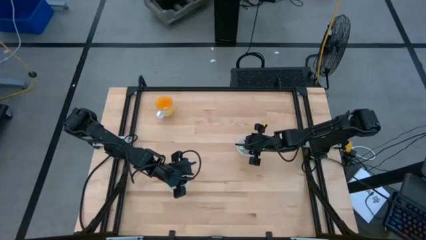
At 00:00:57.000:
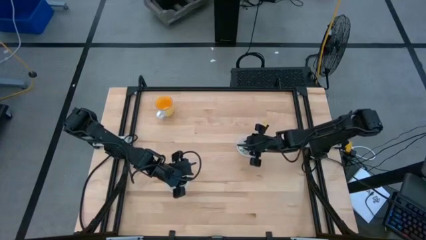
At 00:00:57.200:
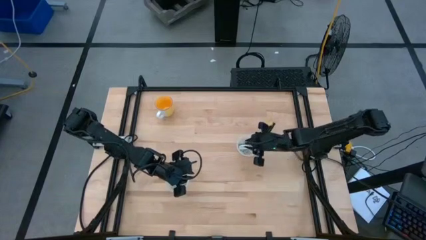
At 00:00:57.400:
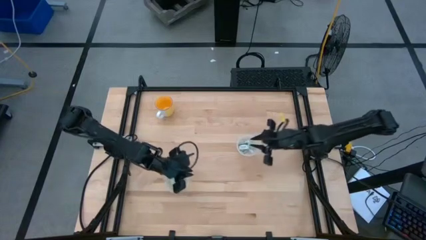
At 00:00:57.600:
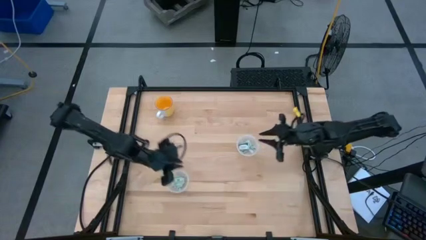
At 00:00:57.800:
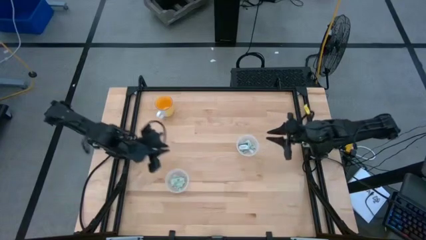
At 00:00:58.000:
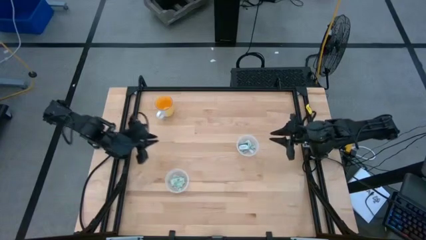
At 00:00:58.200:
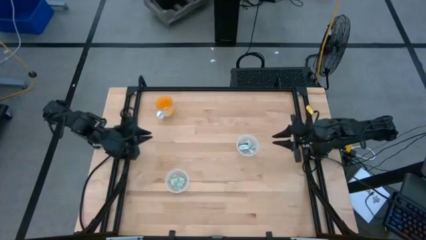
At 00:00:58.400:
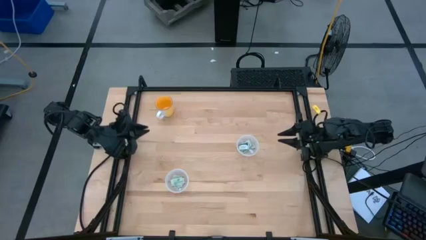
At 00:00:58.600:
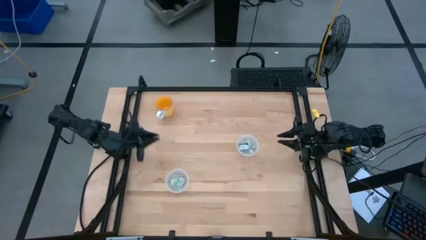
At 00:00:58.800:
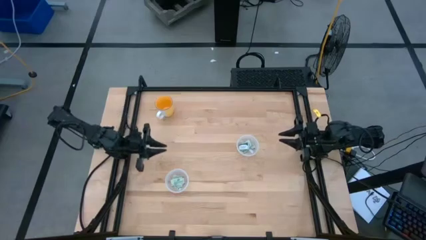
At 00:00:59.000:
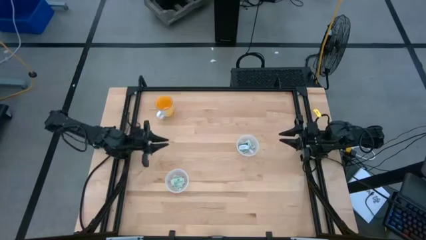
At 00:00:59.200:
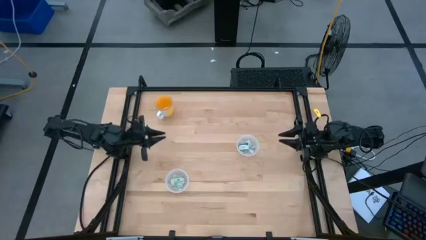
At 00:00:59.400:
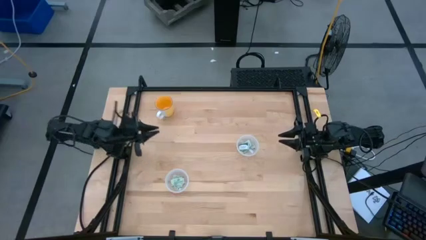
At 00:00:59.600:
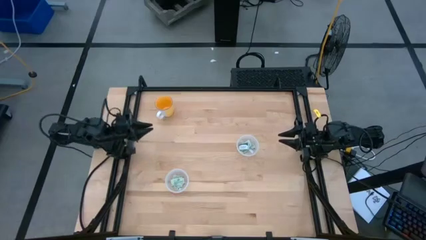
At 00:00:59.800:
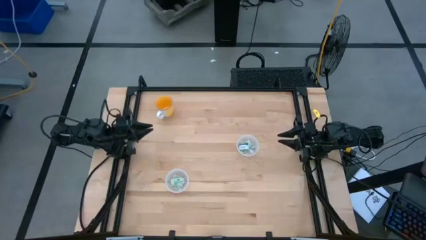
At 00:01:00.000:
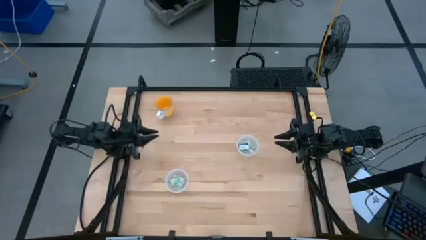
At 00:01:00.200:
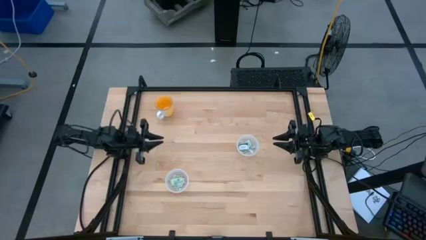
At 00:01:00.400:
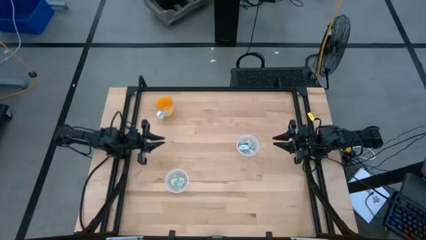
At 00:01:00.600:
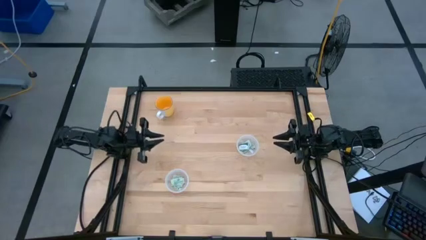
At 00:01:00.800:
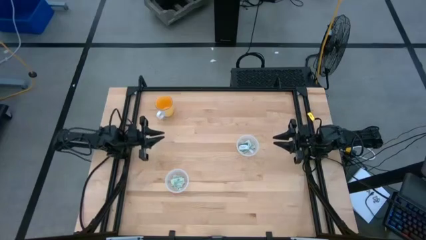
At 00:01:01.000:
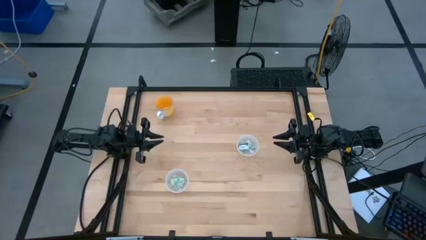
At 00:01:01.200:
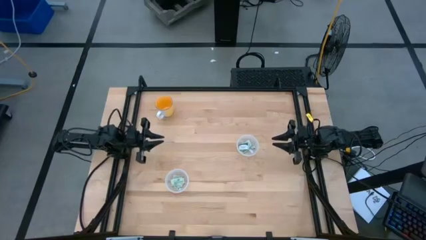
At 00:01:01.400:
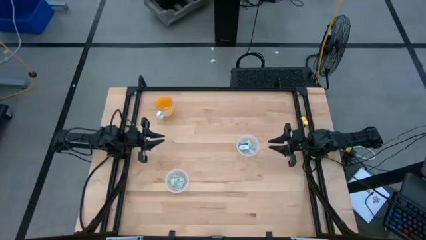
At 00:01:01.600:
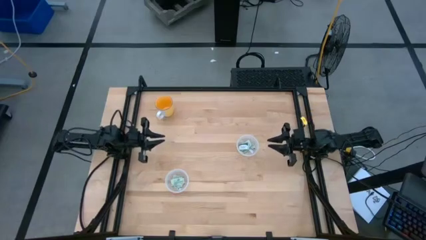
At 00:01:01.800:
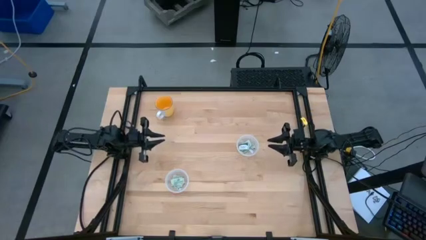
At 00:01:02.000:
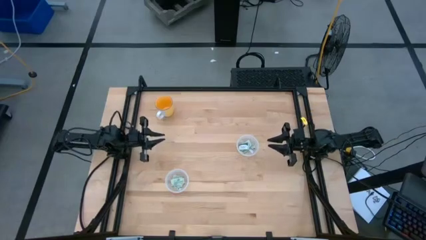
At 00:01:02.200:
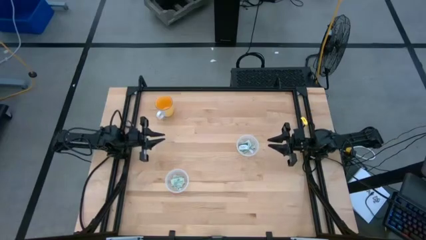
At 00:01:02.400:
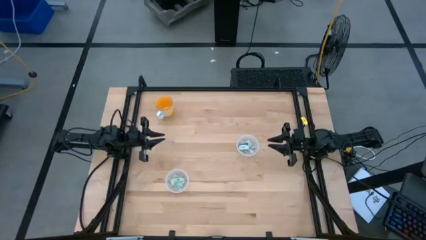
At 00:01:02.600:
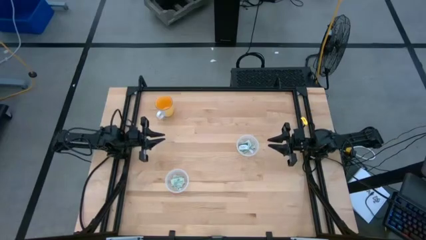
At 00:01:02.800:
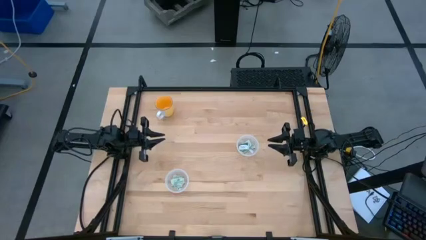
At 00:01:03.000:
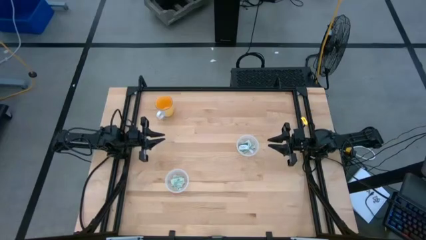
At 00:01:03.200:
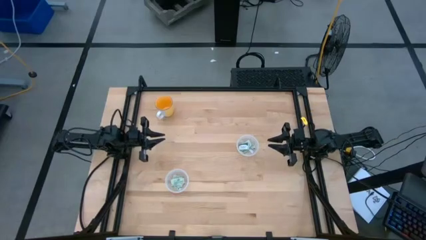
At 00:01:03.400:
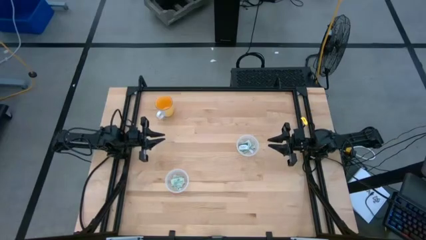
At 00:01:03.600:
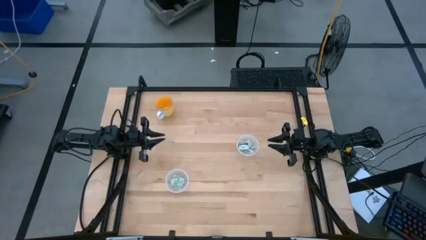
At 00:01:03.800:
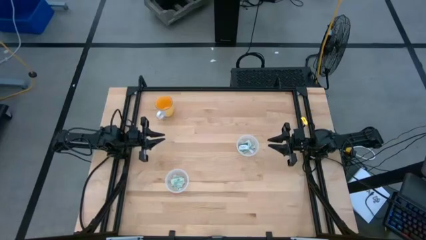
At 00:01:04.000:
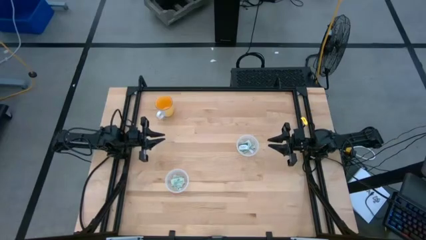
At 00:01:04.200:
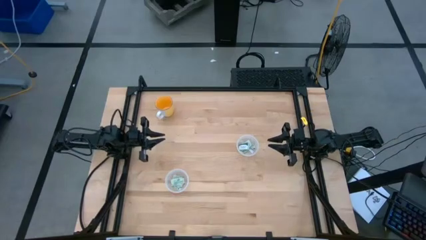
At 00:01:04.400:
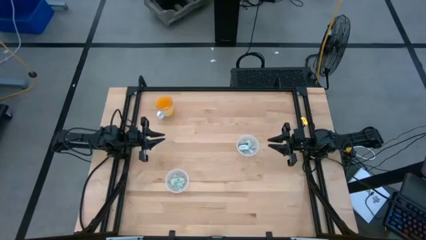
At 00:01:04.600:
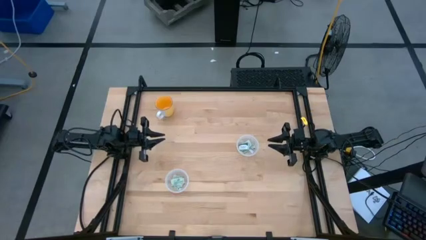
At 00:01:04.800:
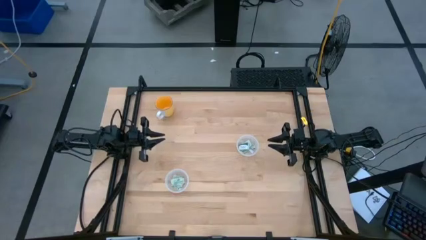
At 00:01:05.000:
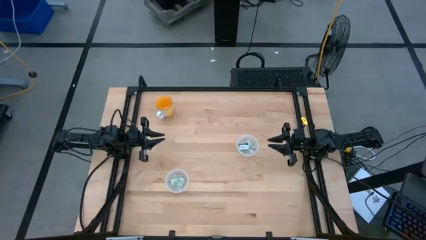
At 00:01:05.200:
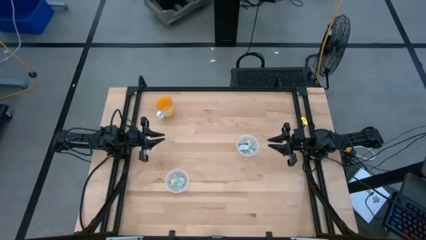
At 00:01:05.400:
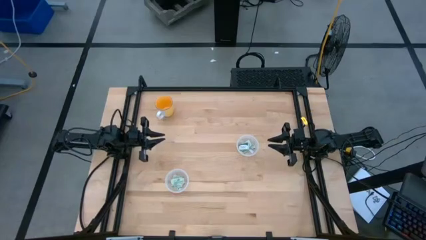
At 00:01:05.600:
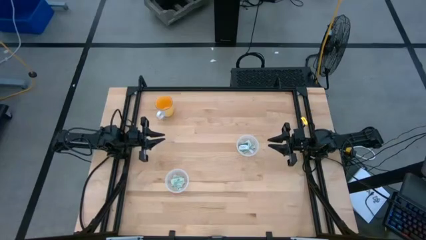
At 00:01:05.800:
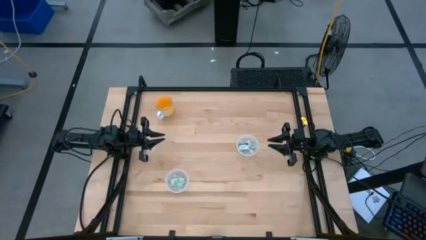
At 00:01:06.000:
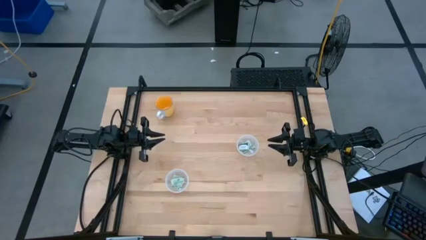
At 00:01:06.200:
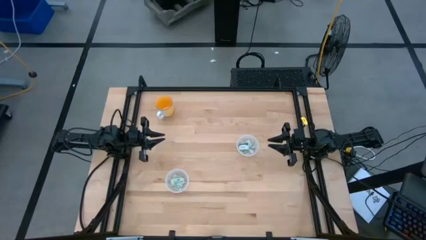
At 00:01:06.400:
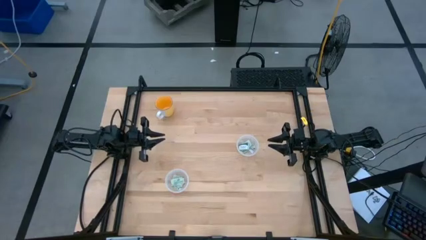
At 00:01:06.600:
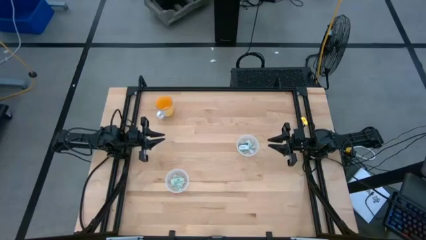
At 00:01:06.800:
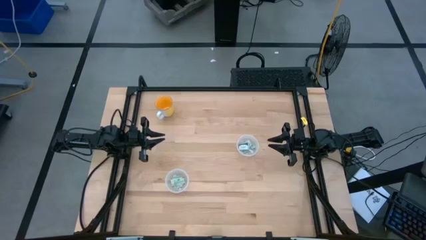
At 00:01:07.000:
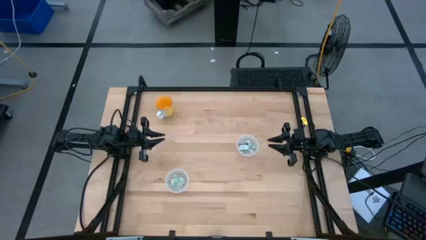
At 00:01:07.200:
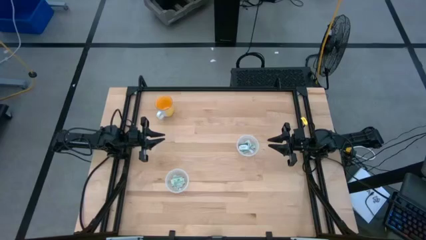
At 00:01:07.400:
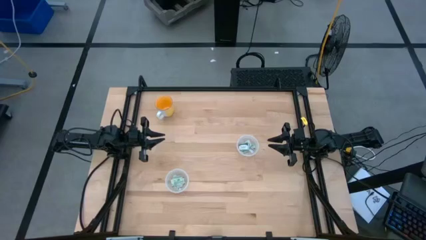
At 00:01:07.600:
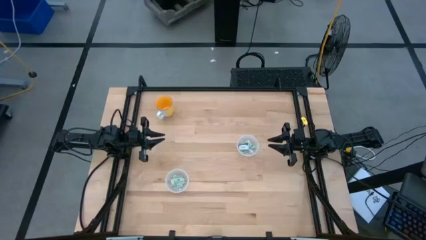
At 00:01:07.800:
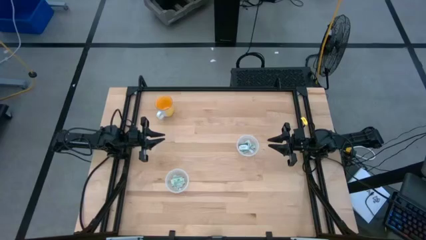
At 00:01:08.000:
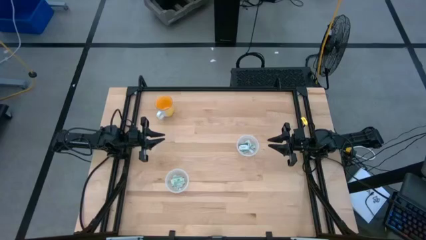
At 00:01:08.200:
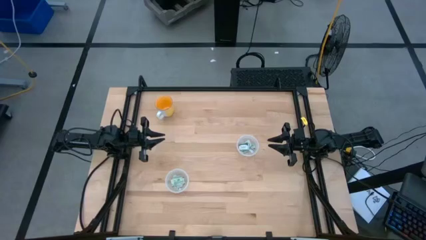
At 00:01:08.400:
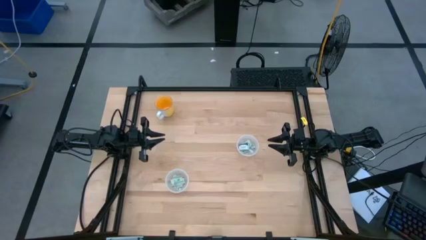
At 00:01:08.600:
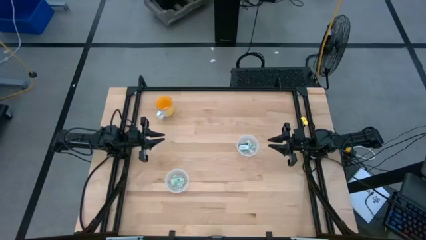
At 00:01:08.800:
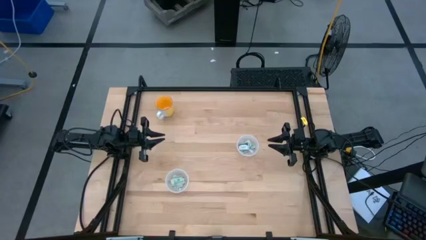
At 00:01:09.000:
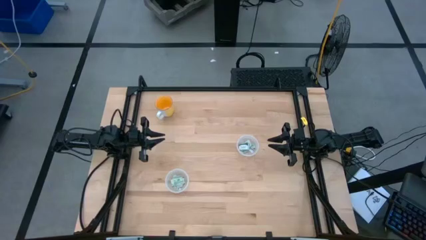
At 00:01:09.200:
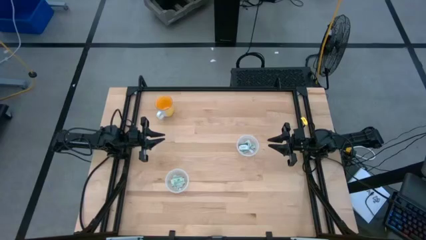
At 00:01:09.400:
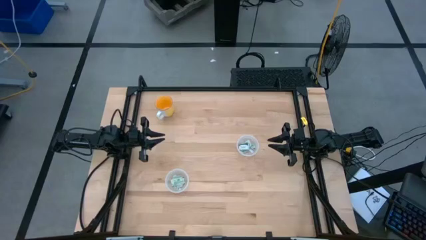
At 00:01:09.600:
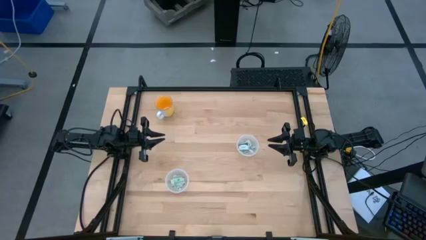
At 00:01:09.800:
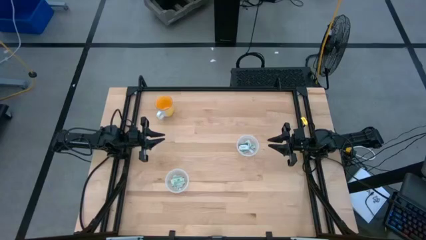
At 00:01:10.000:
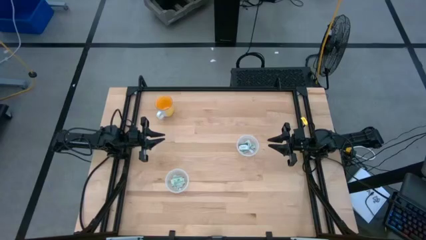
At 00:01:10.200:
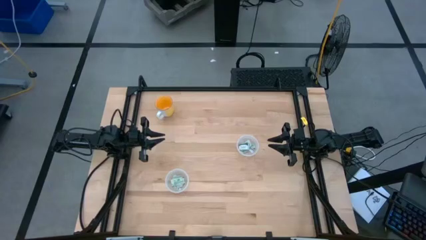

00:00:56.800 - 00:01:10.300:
Task: Pick and place Stevia / Truvia into bins
Return to Home Position

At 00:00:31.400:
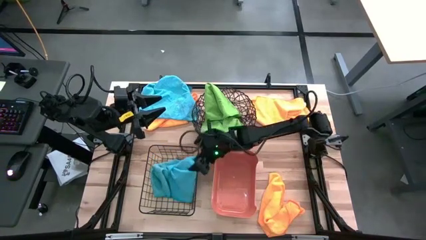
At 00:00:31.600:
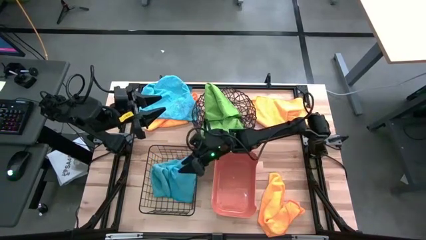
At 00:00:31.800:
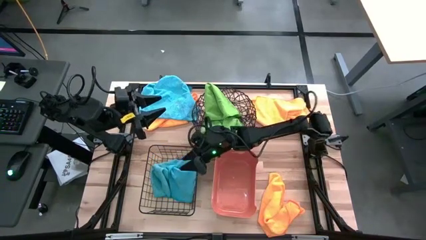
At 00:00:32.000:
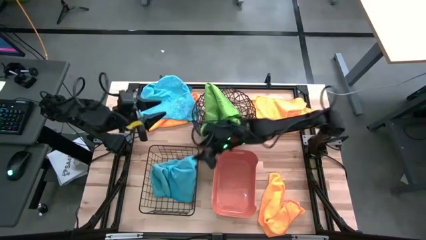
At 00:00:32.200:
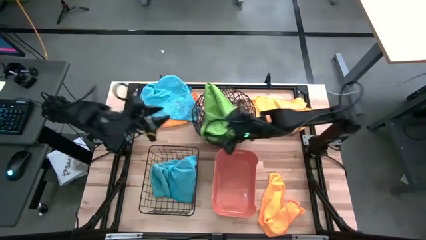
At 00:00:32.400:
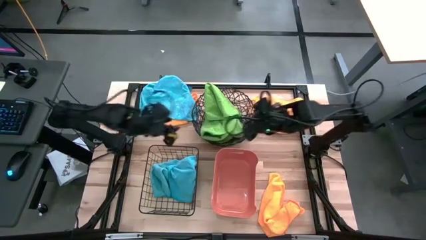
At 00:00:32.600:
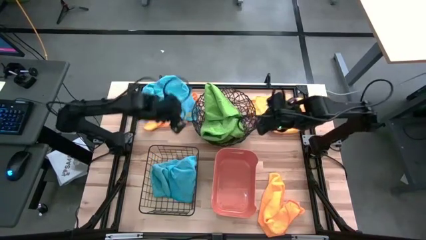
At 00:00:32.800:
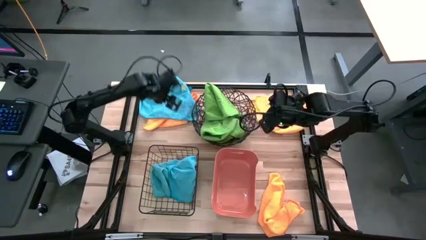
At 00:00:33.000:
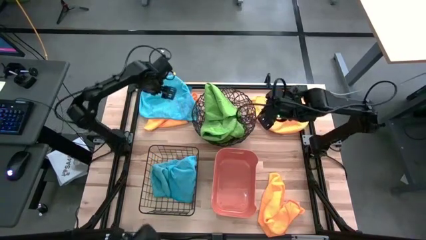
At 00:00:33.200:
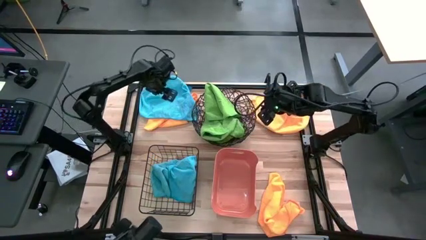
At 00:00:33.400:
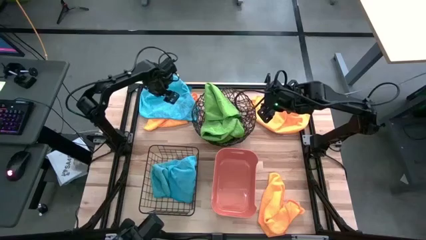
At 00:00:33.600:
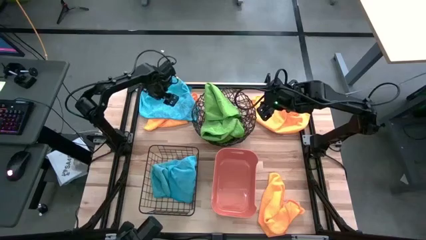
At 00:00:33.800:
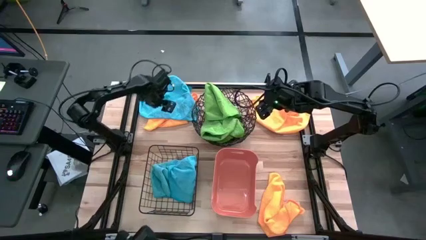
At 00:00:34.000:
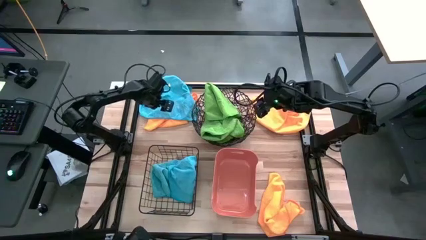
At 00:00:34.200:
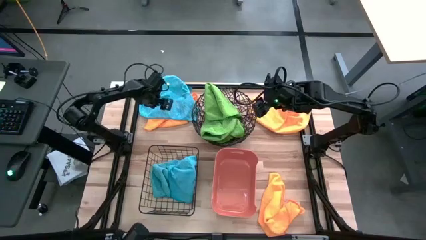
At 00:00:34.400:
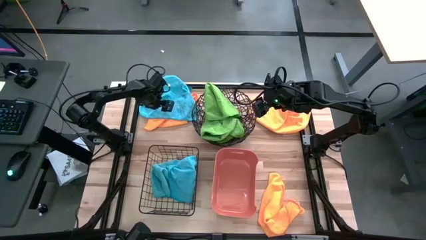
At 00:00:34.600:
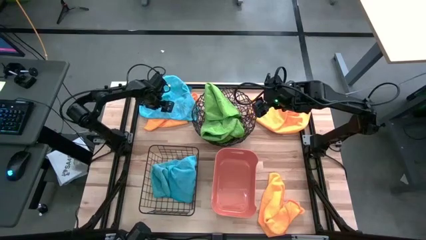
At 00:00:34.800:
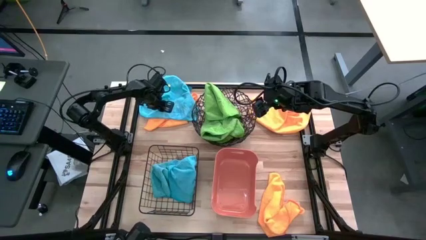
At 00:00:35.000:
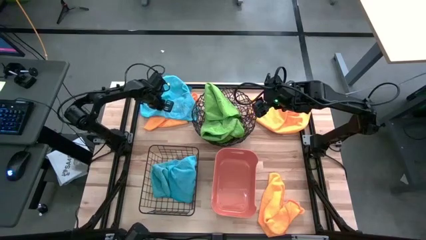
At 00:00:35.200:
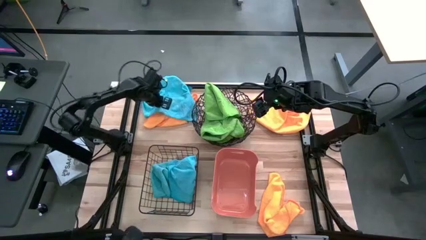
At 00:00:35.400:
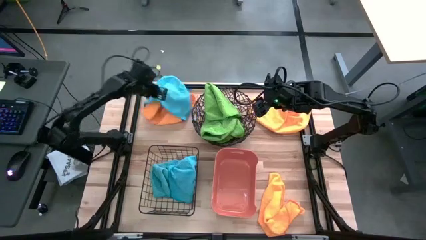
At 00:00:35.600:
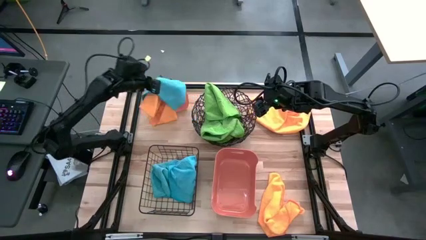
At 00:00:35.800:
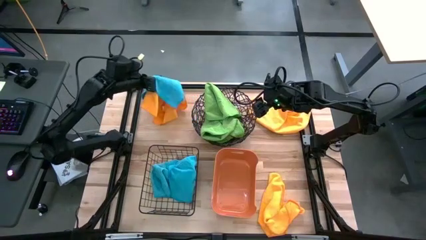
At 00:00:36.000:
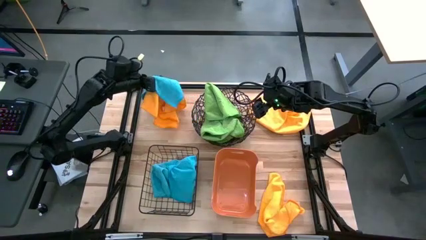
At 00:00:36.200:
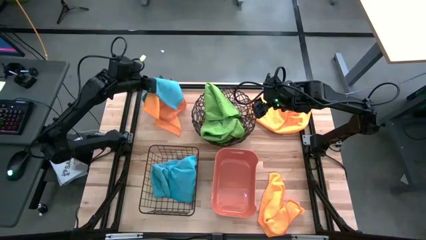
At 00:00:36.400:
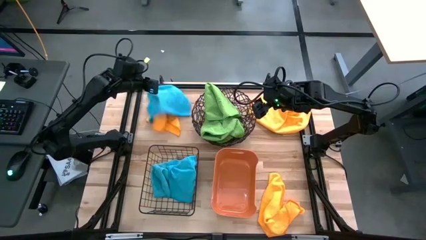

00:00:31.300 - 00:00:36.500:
Task: Sort microfiber towel by color & place in baskets
Put the blue microfiber towel into the black wire basket
